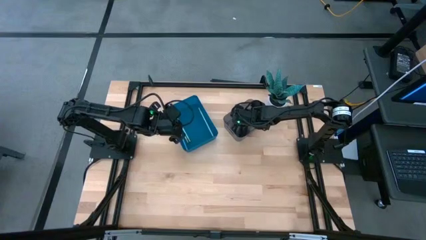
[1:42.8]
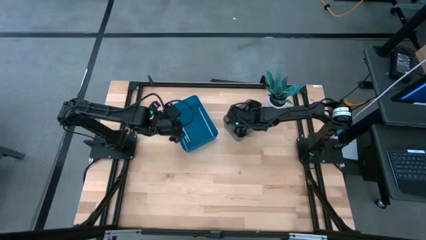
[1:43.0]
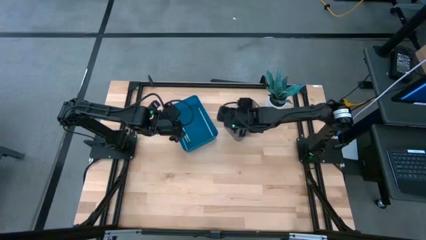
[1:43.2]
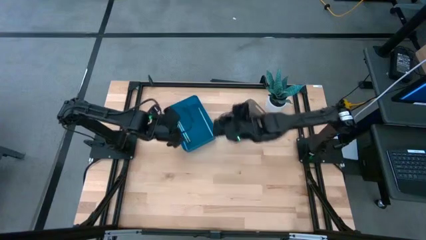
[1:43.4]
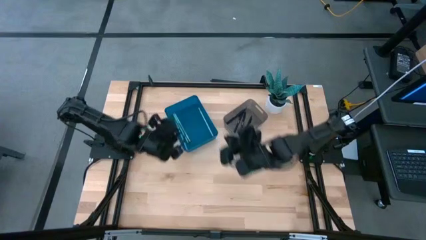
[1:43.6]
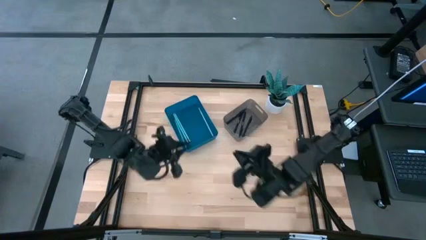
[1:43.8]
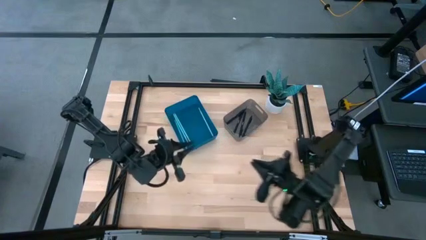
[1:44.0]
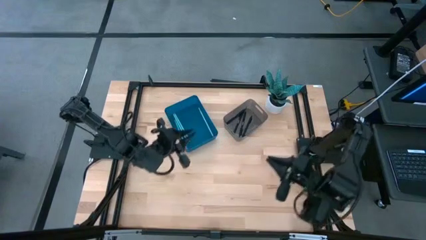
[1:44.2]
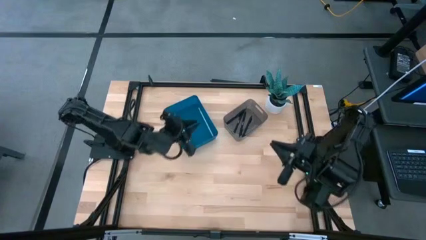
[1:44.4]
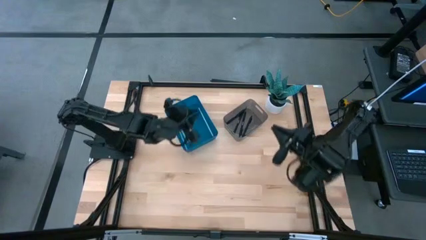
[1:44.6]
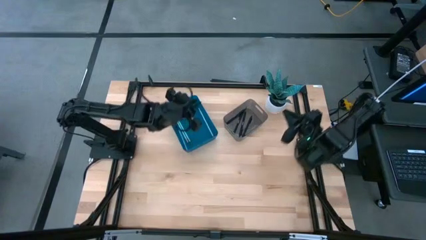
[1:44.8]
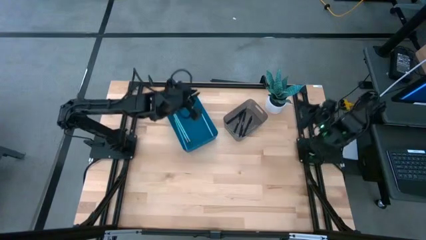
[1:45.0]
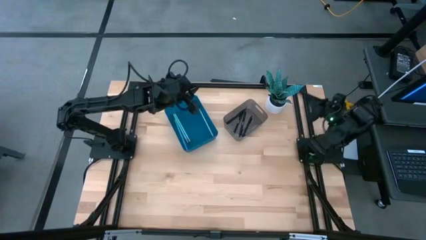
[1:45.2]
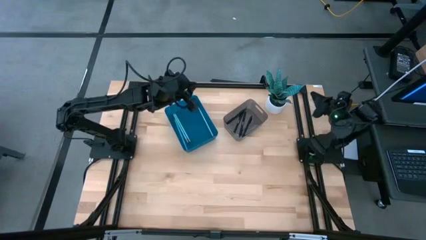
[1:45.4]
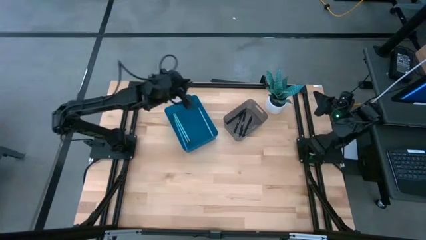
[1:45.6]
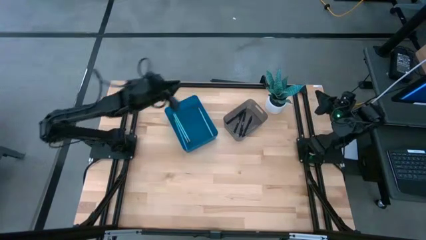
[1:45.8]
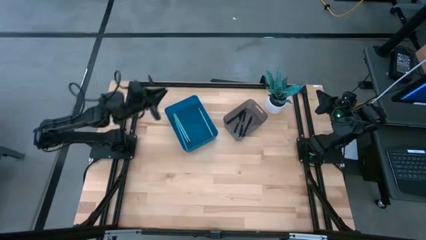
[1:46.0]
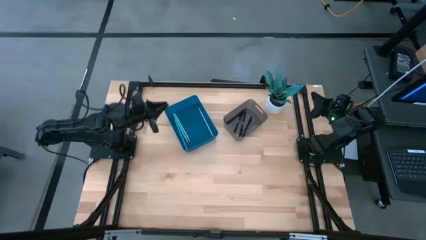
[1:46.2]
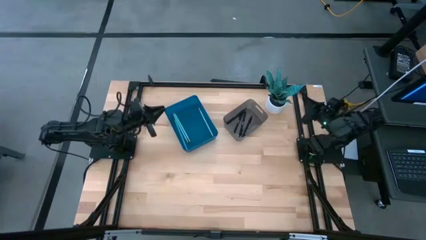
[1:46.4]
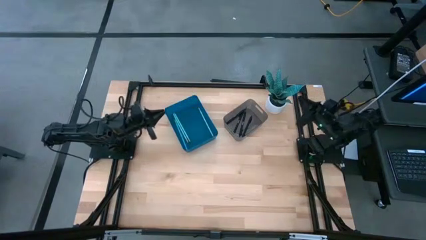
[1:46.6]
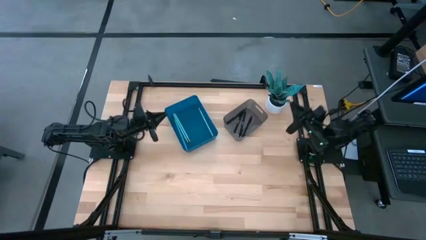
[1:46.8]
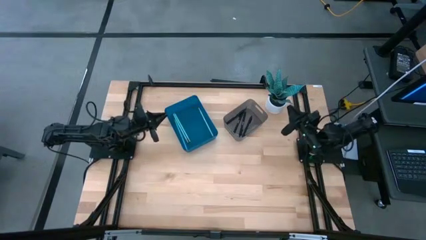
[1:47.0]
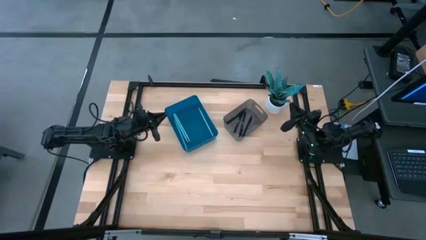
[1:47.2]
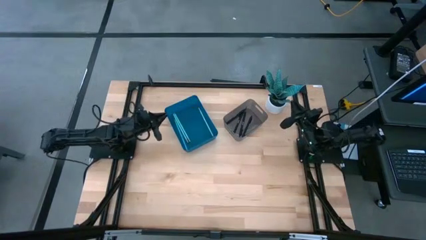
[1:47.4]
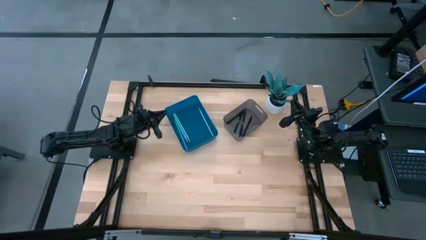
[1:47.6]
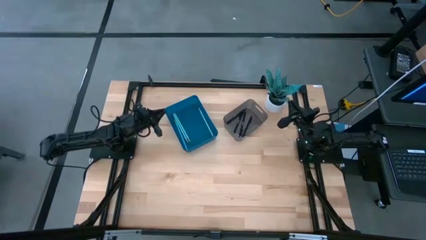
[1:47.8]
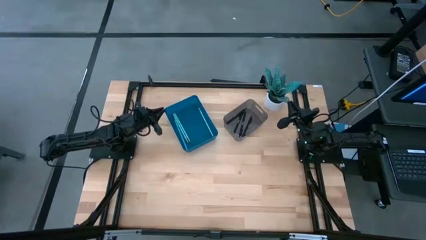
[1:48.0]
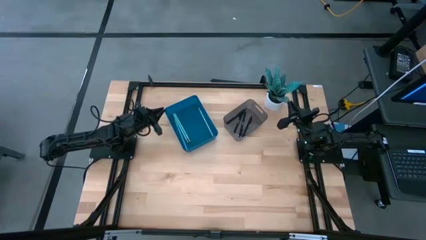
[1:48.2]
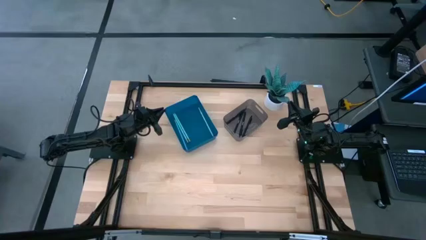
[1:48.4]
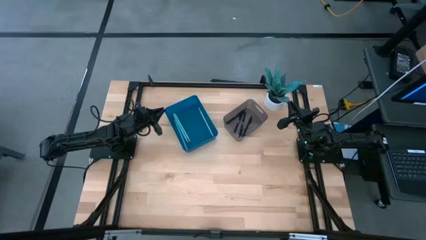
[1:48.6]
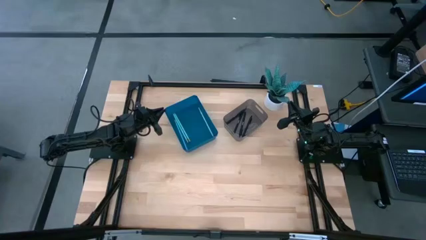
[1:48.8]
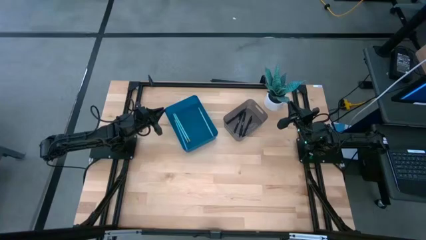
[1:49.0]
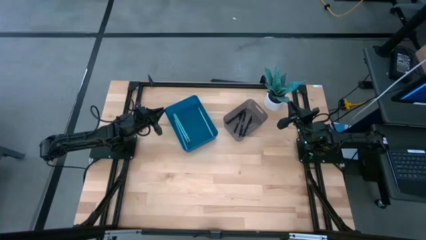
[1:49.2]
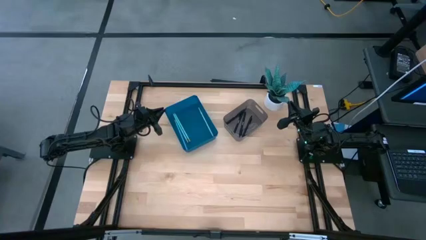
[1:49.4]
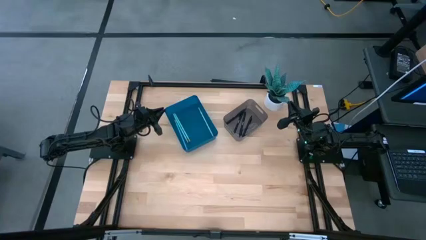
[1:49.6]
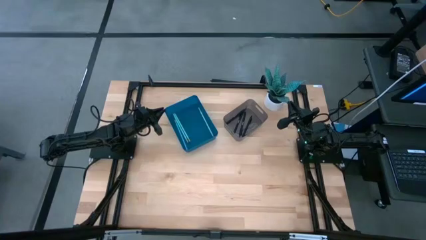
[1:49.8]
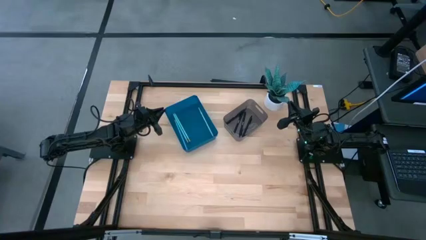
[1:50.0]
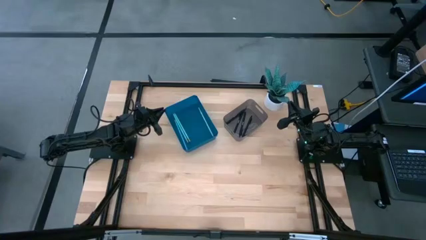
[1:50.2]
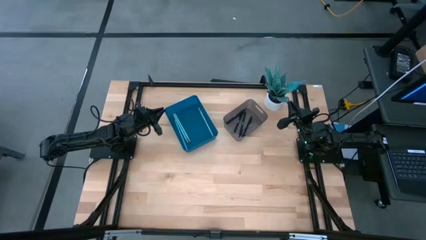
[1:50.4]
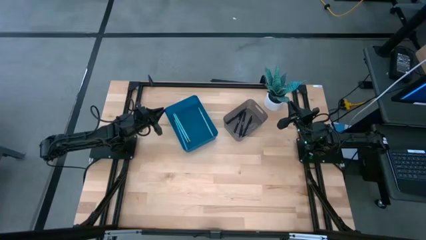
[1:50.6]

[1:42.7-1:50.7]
Task: Sort pens & pencils
Return to Home Position

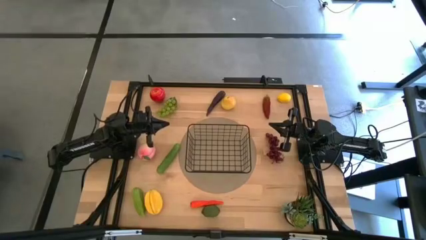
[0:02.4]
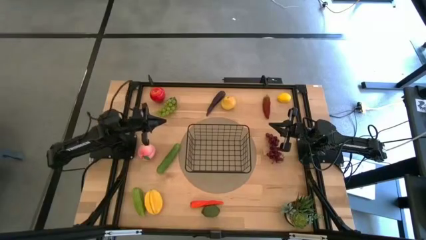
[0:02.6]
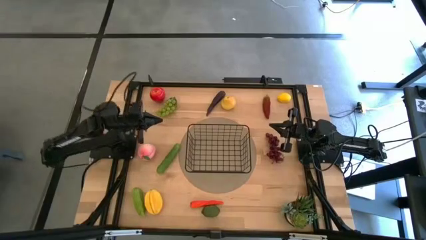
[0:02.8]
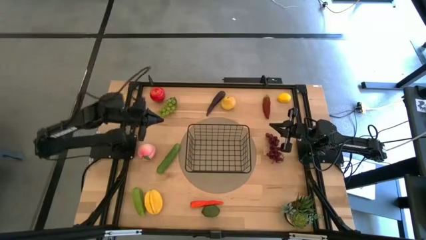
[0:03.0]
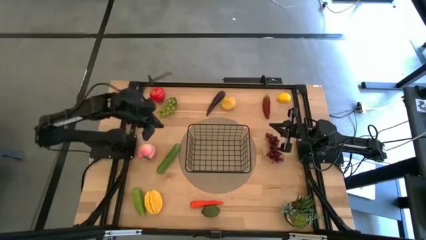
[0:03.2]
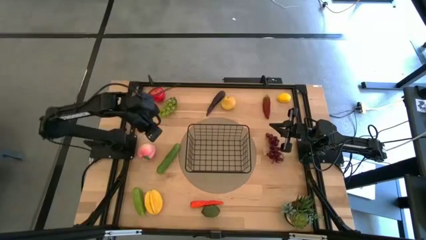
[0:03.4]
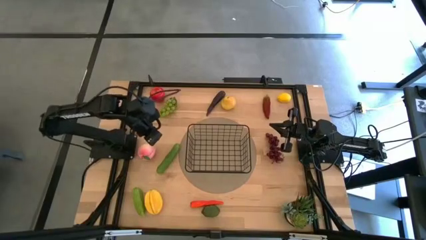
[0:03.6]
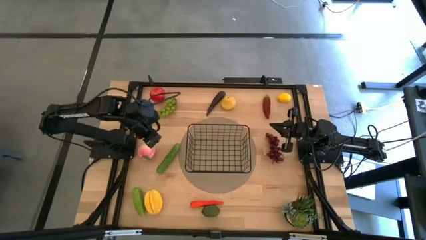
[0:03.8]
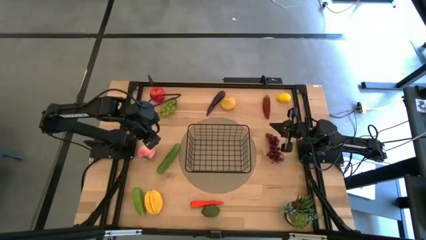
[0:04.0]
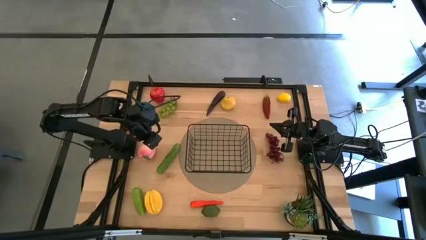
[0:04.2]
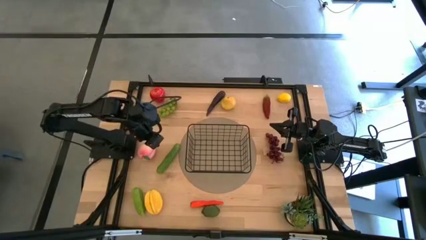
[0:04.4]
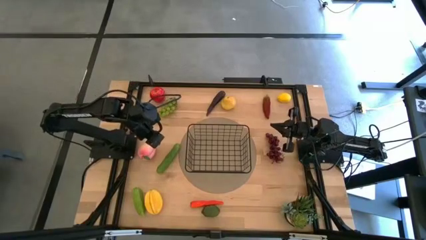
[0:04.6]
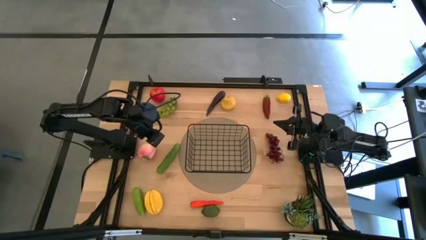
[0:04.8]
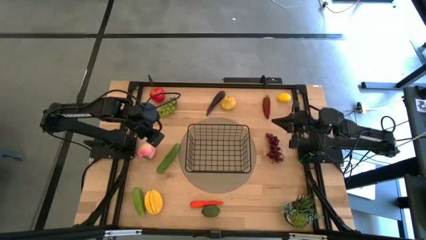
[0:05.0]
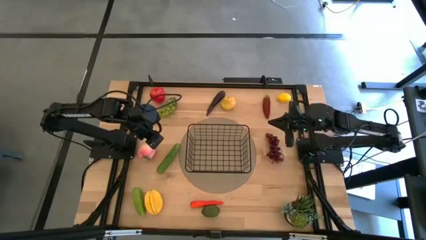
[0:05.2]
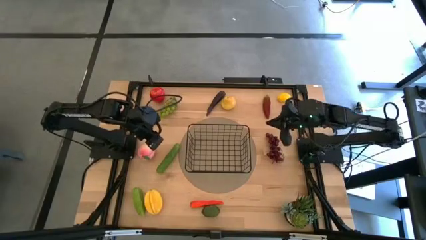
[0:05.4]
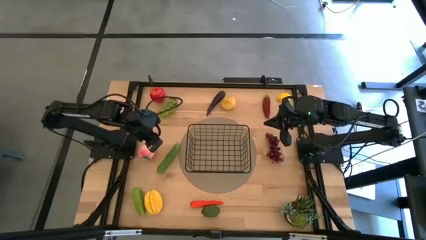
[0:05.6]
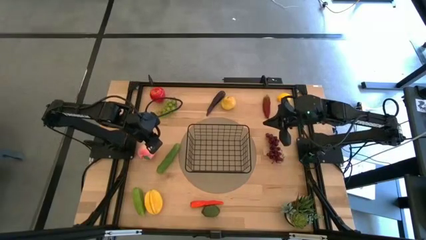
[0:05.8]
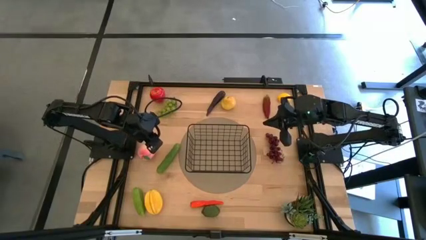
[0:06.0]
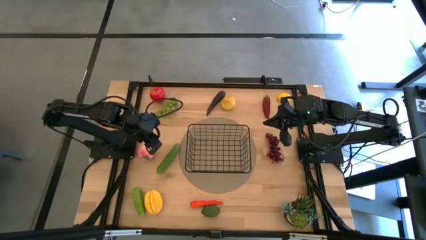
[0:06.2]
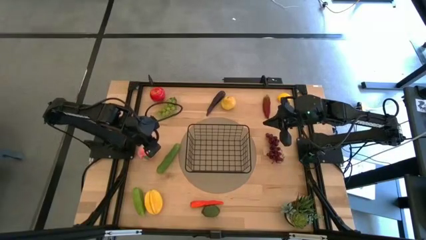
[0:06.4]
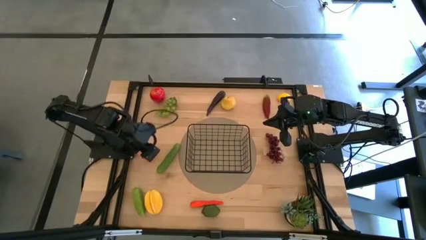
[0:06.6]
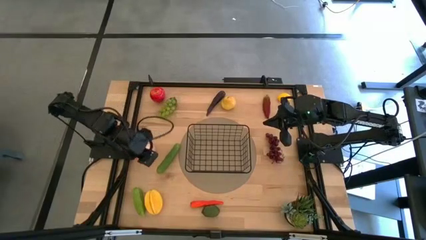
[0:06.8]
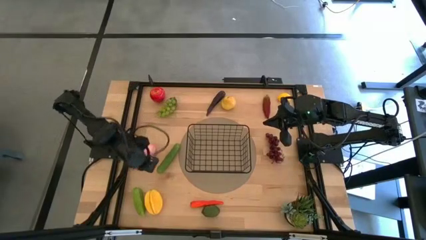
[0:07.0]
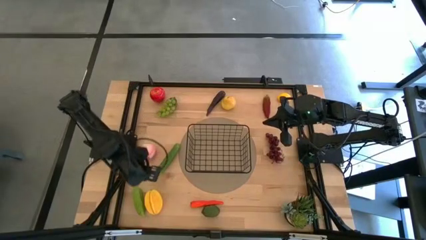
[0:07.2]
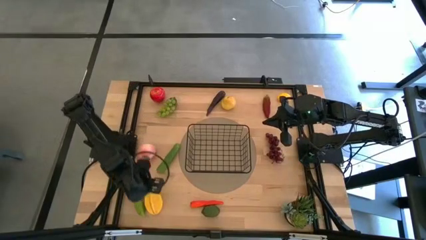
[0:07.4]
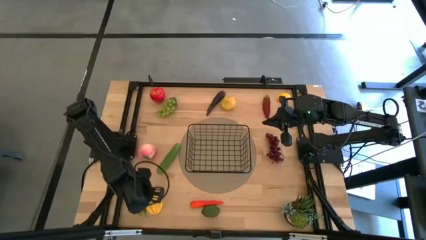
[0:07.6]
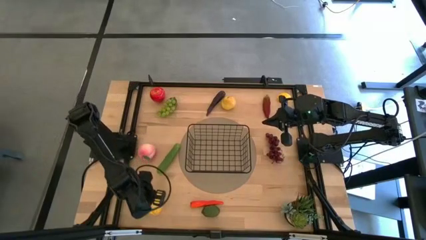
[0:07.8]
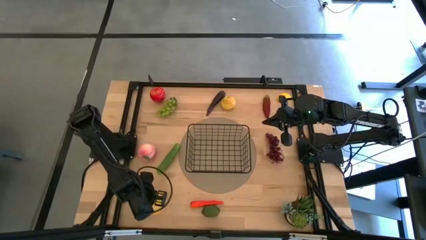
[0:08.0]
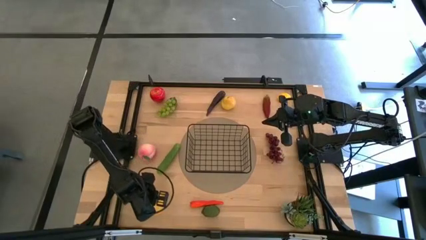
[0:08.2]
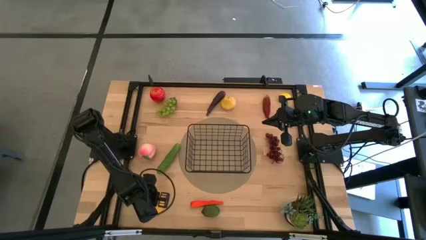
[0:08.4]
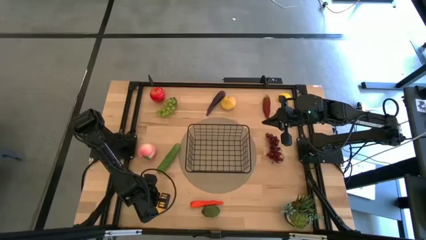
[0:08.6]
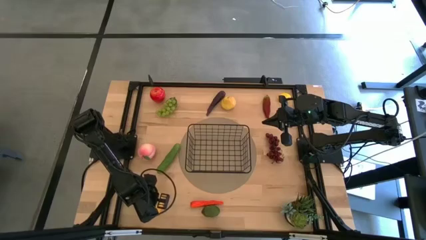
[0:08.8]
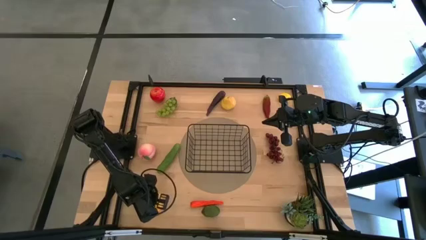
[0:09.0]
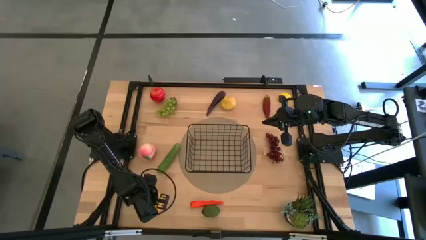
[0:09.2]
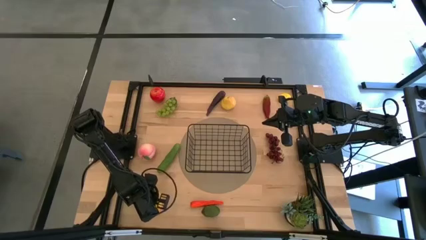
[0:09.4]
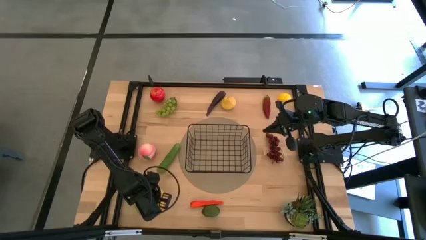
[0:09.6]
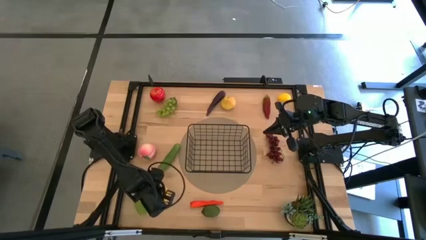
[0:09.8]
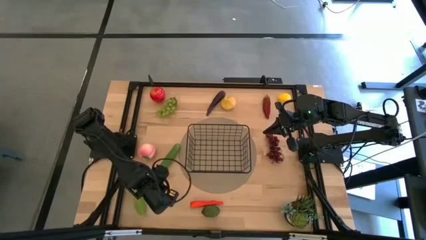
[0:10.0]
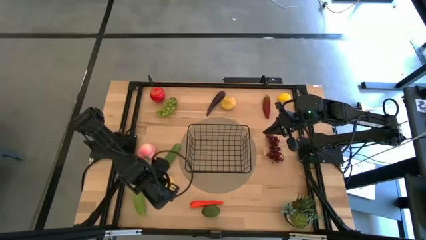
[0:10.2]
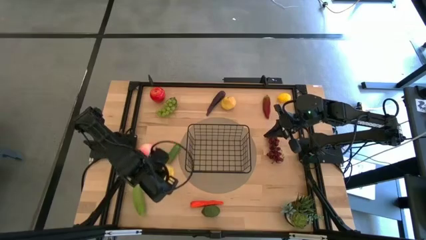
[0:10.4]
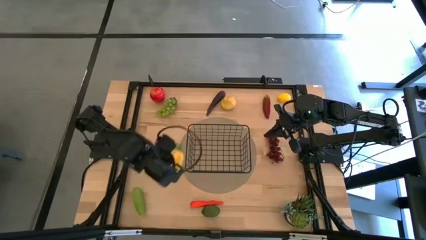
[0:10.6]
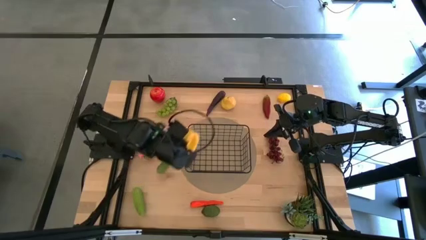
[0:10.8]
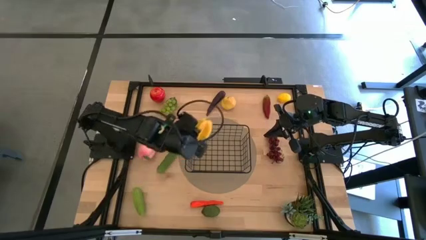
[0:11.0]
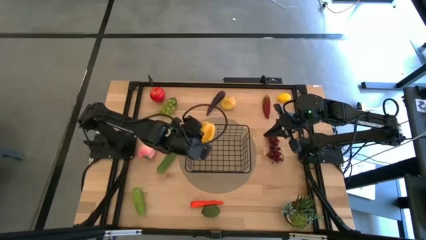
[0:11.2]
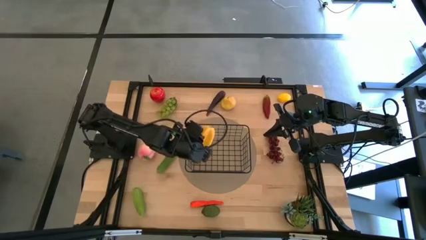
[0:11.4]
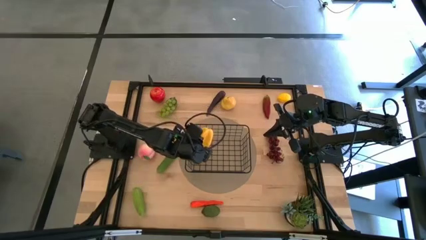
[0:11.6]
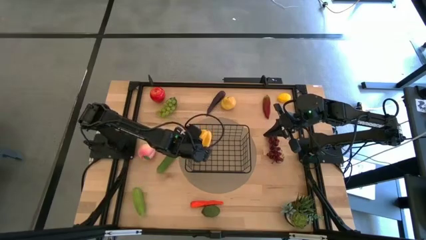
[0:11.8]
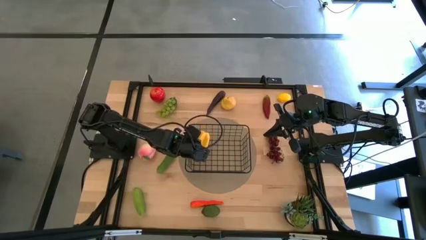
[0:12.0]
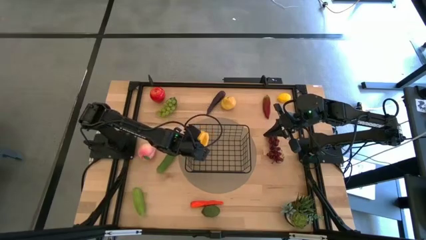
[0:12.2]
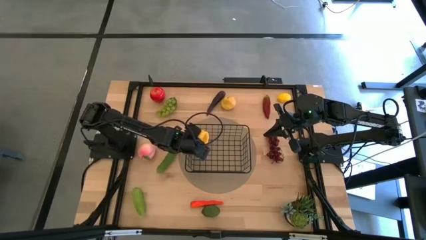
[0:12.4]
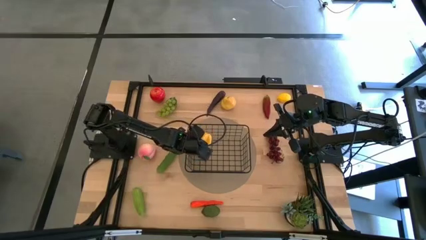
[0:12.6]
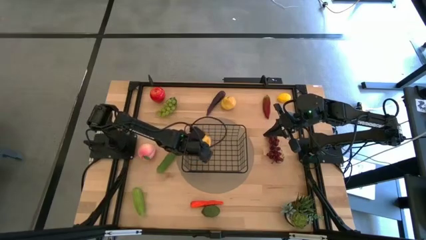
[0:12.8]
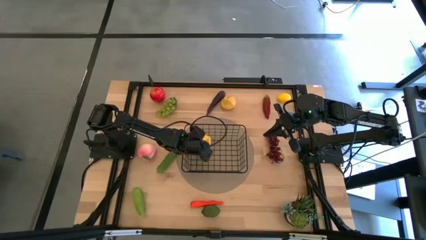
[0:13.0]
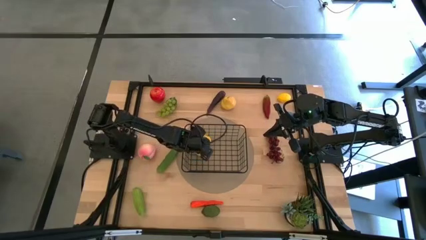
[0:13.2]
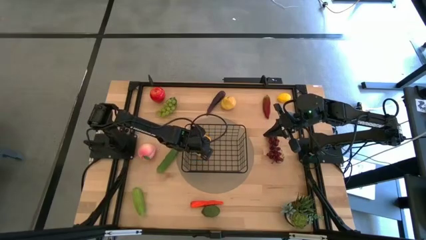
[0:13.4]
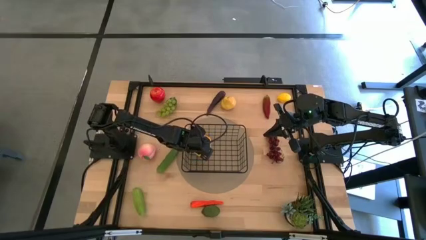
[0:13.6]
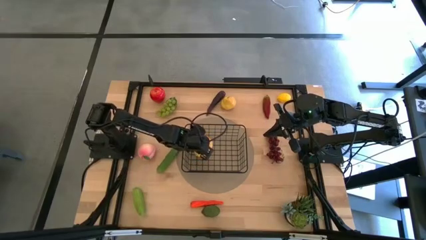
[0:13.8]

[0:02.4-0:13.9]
Task: Build produce basket
Put the yellow starfruit into the black wire basket
